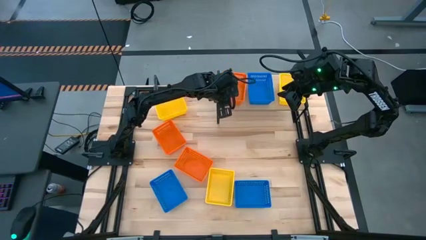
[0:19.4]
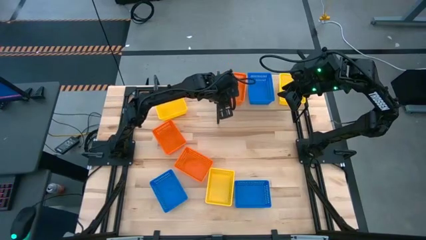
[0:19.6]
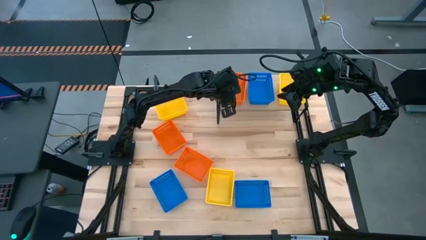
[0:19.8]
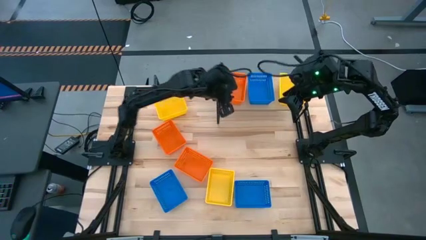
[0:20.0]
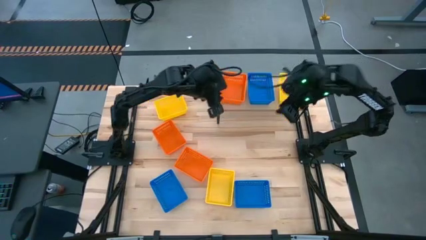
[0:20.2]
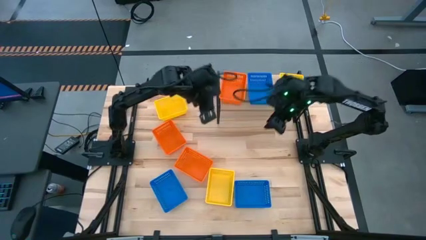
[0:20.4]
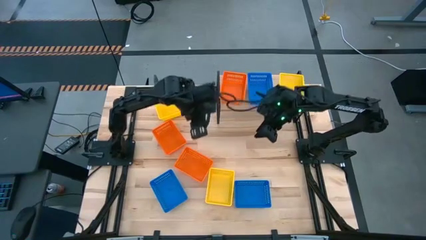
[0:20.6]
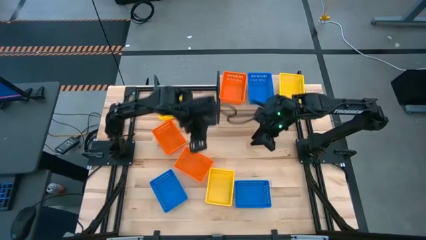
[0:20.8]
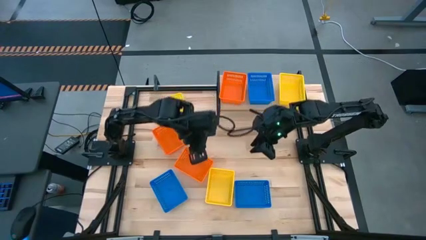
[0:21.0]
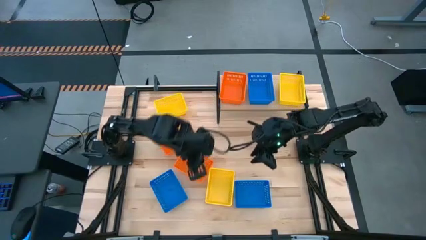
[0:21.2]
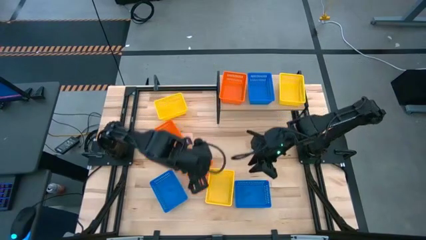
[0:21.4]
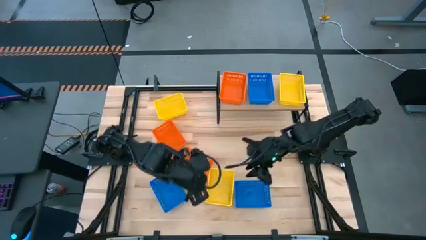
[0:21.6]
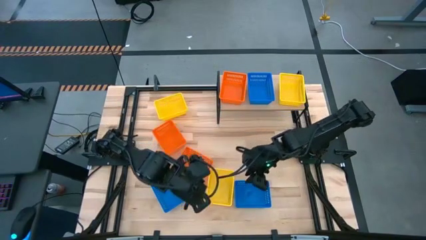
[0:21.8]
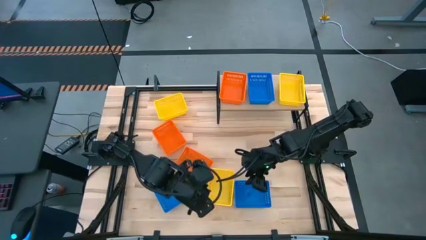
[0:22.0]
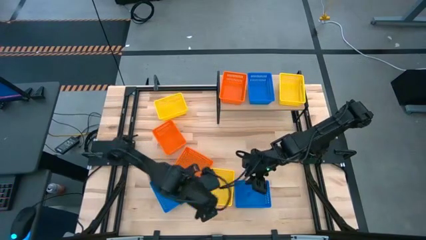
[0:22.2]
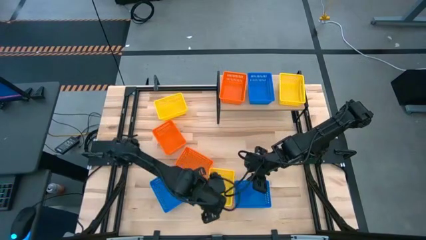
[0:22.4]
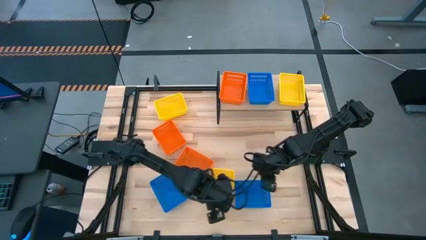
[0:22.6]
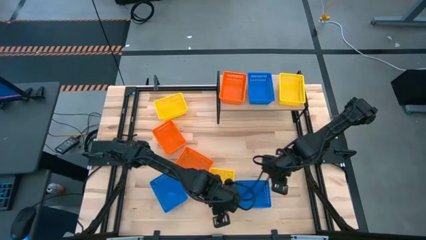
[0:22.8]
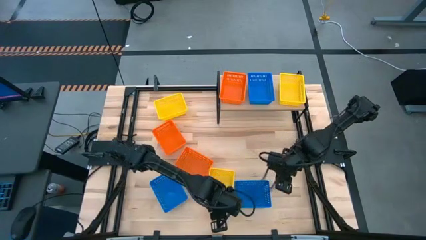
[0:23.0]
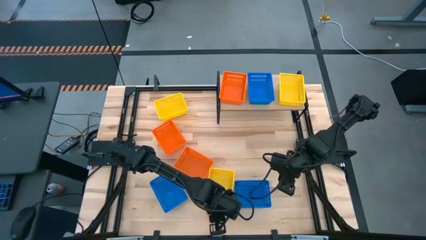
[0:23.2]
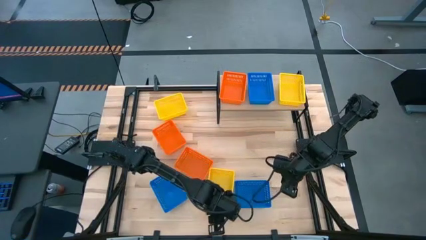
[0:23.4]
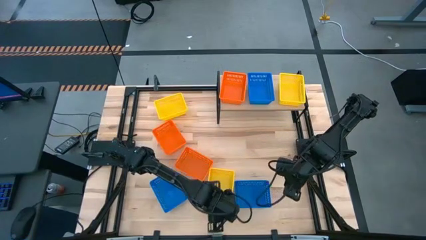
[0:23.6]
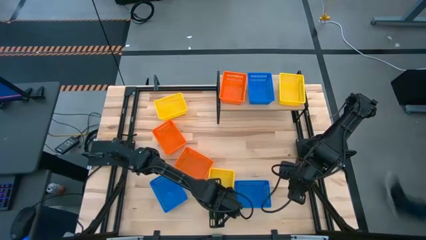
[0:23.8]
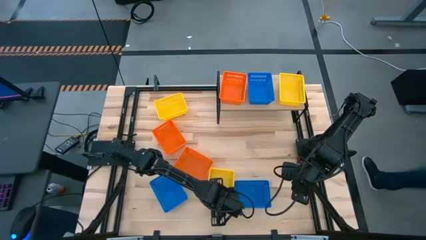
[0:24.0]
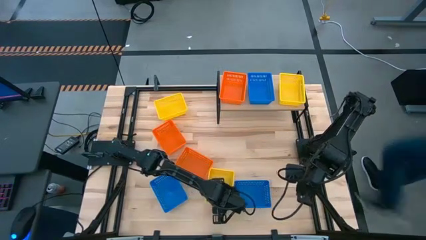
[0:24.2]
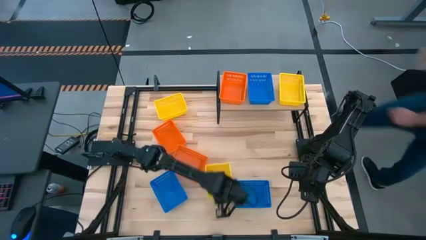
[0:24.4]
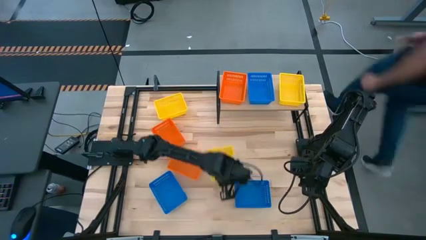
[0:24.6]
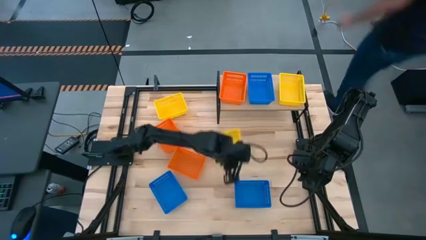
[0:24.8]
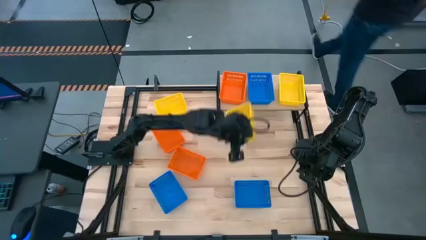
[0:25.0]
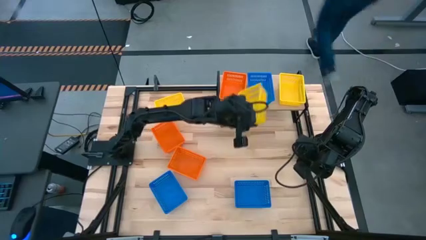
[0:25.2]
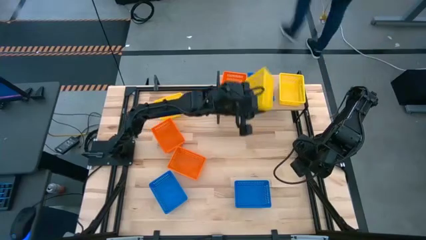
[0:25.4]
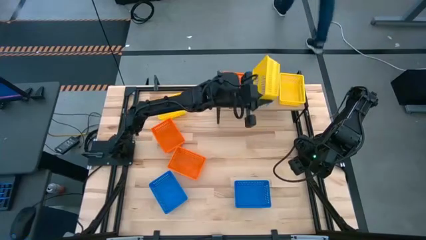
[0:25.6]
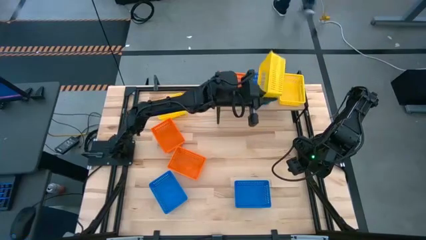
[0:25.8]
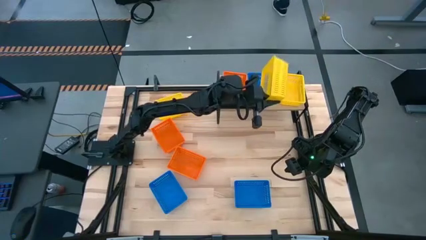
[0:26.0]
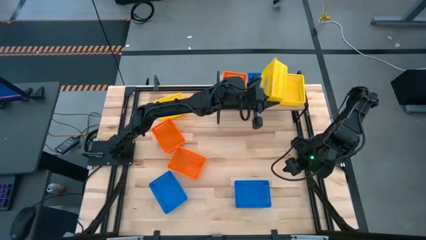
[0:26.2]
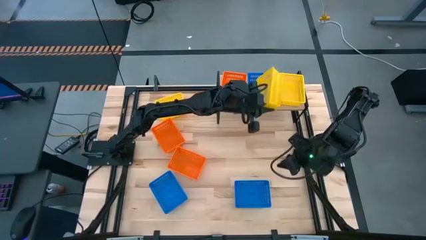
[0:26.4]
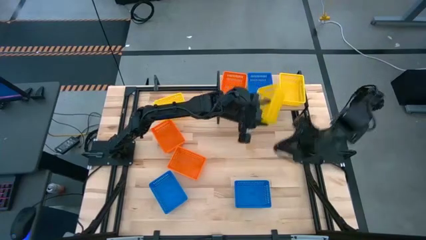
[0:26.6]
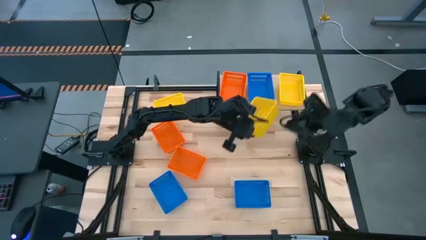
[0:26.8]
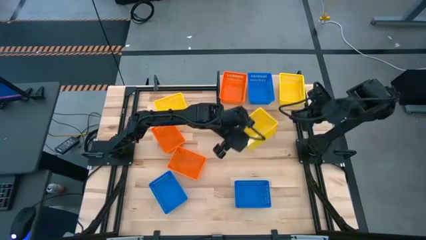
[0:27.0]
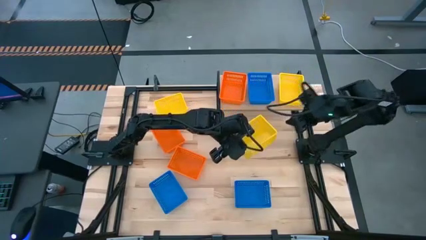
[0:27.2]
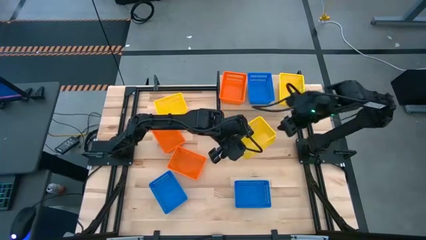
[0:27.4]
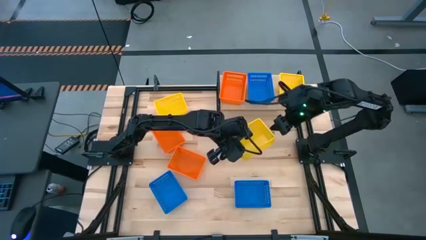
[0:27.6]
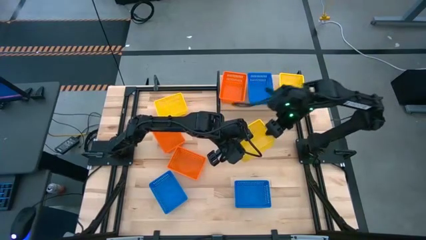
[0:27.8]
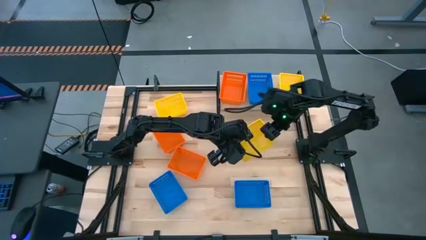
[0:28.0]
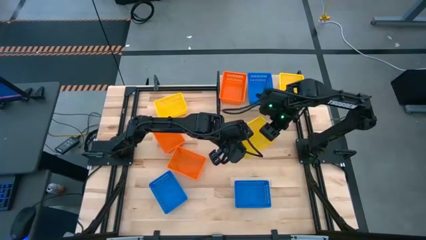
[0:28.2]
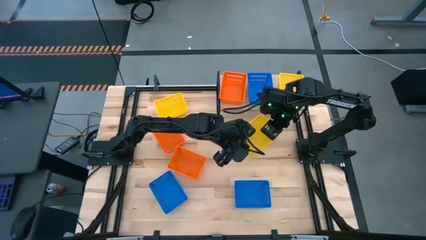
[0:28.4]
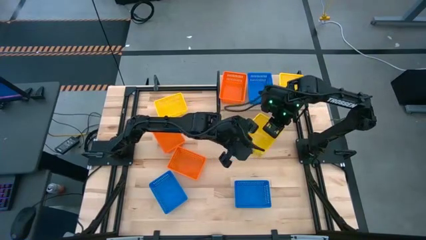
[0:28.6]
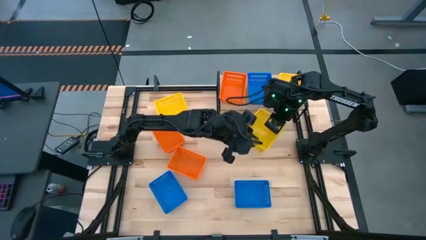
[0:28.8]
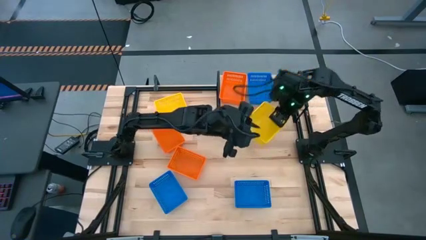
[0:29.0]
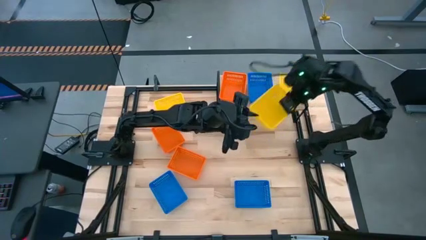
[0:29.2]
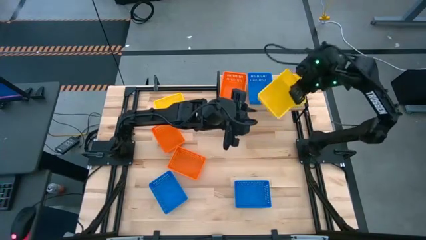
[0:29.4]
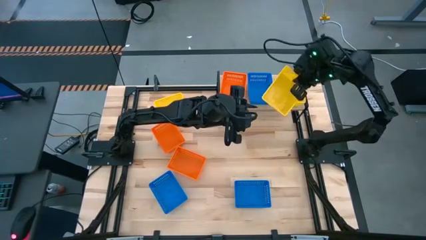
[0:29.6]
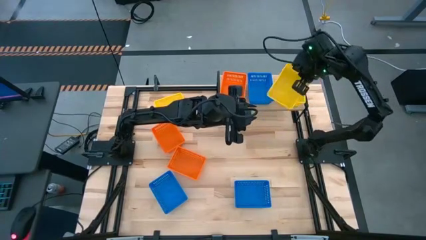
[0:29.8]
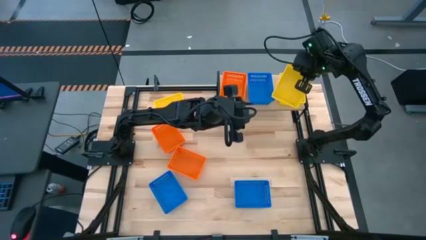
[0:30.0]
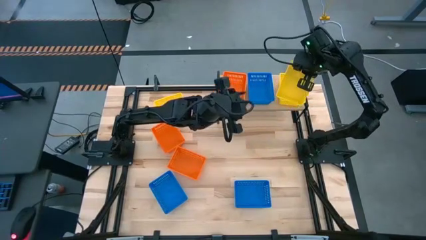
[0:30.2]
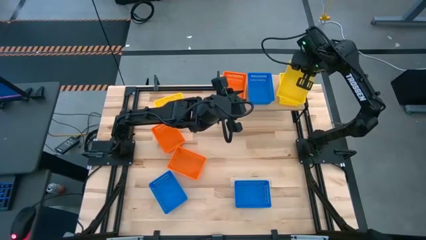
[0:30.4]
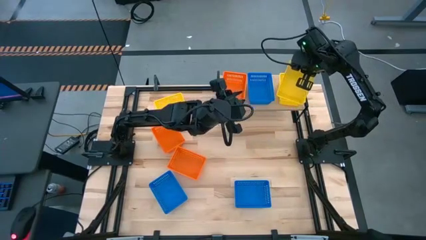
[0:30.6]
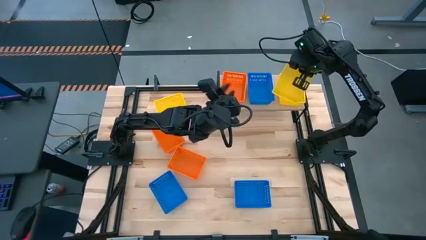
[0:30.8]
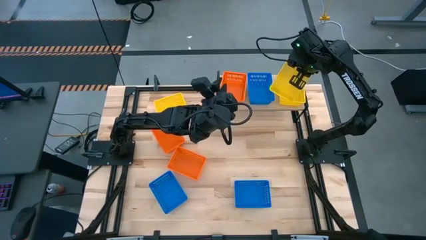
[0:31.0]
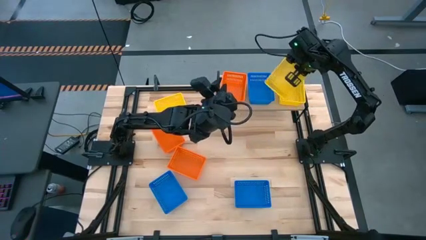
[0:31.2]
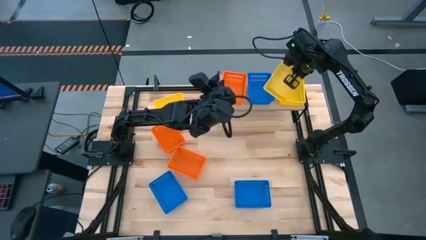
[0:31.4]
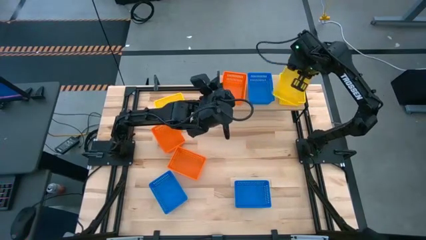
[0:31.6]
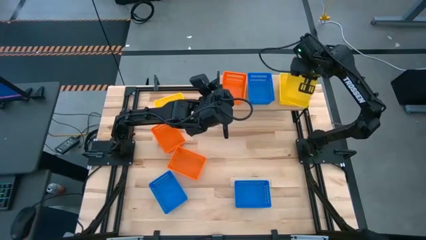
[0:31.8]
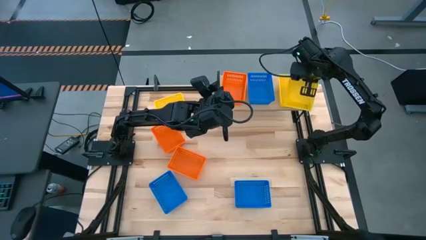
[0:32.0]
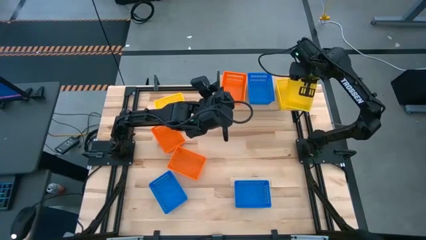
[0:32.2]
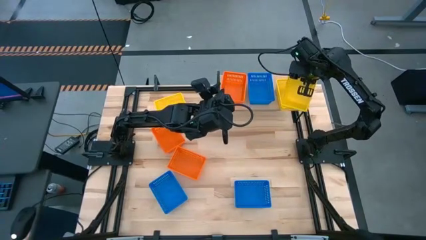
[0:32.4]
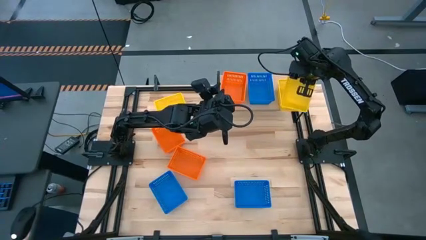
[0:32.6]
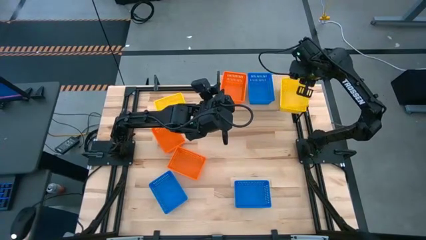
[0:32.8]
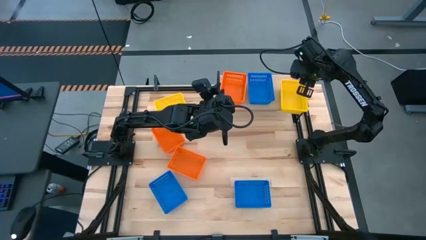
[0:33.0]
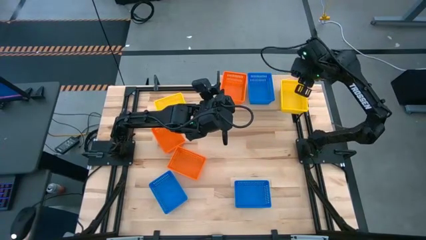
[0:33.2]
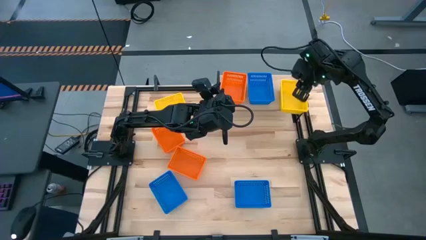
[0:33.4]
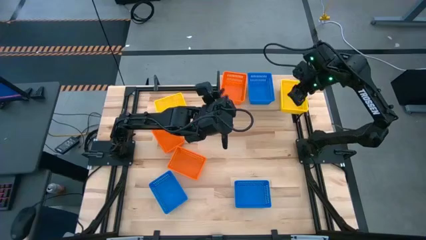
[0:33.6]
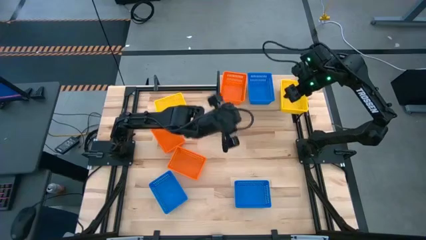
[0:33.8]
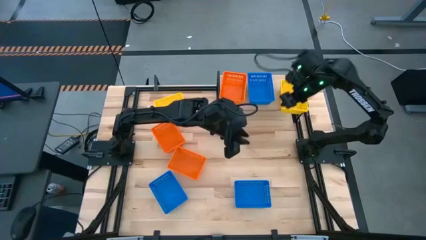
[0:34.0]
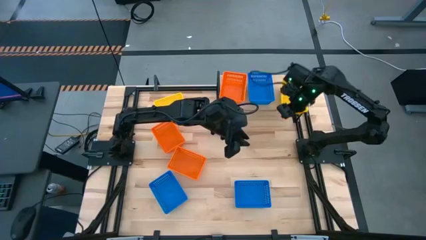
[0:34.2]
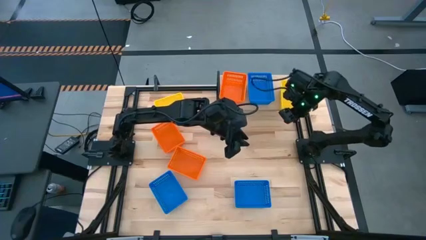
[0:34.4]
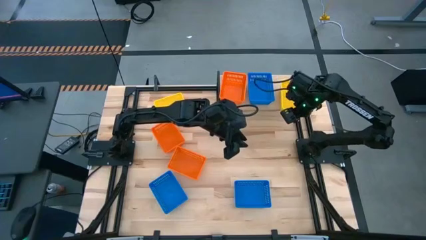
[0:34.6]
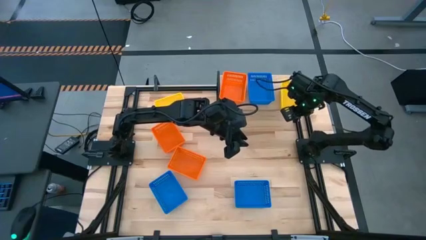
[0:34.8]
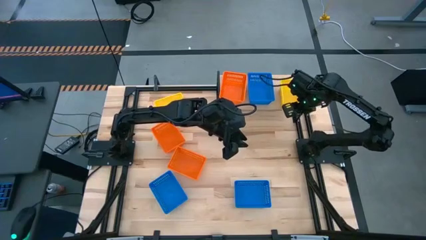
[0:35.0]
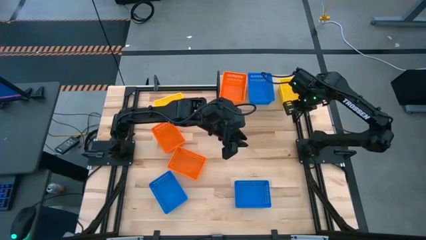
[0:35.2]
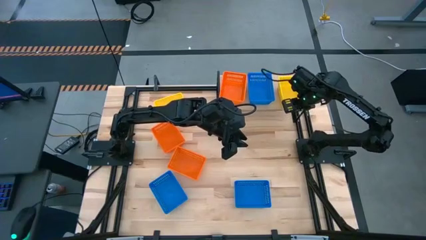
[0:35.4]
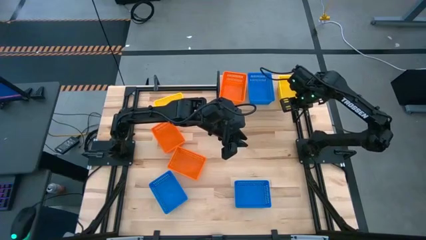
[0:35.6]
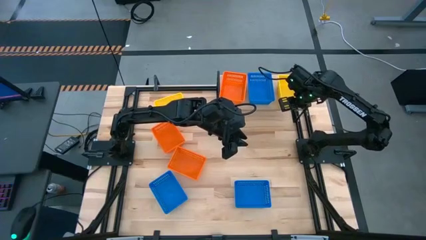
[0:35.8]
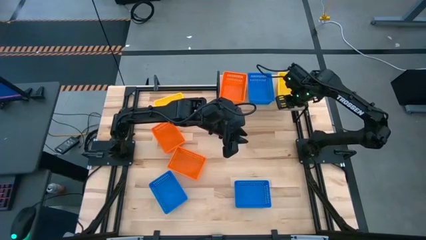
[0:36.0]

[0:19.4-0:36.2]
Task: Stack baskets on shelf by color
Stack the bottom yellow basket on top of the yellow basket on the shelf
